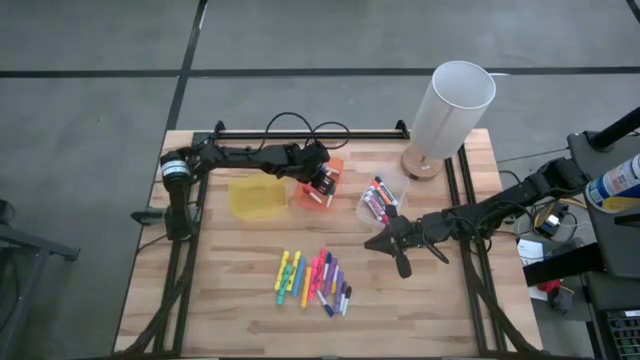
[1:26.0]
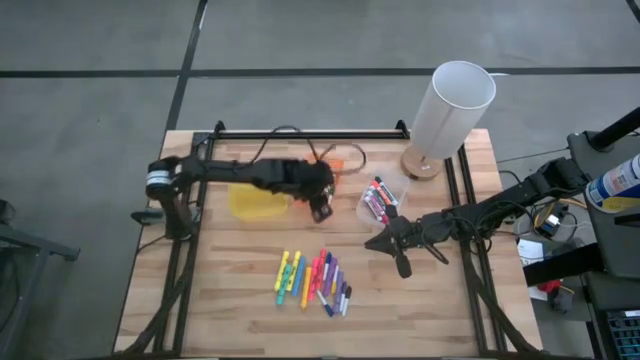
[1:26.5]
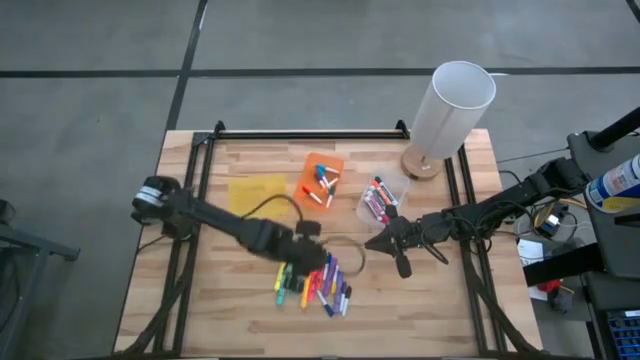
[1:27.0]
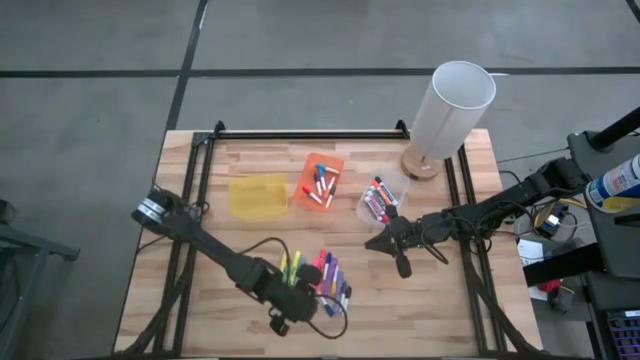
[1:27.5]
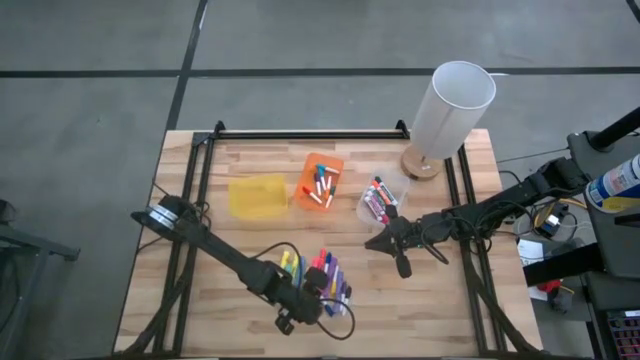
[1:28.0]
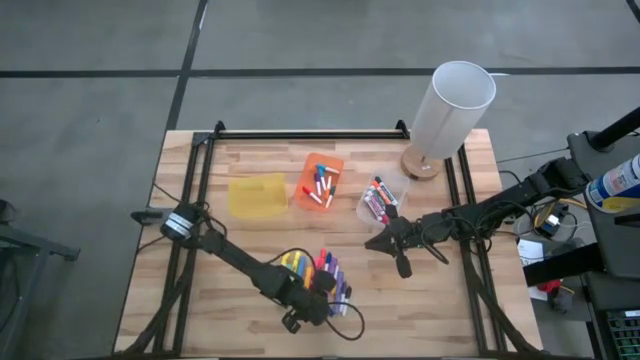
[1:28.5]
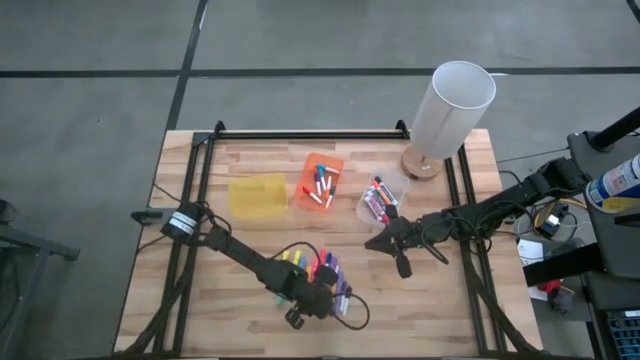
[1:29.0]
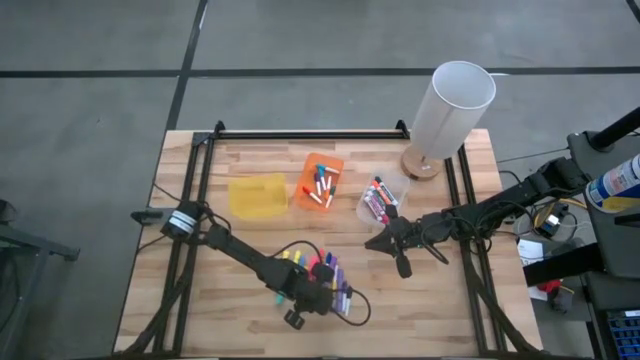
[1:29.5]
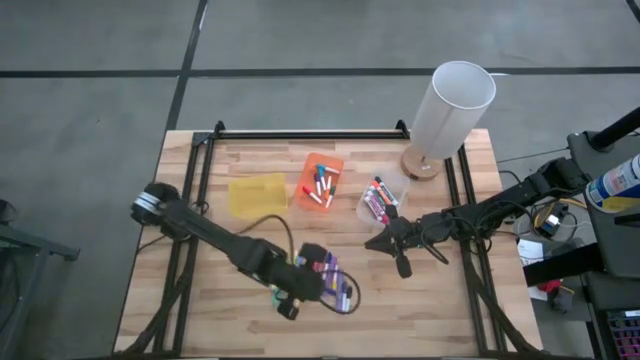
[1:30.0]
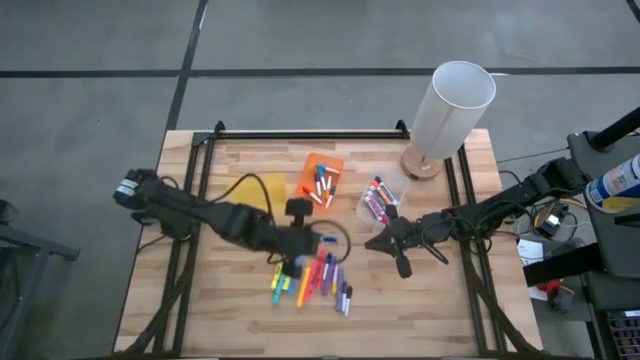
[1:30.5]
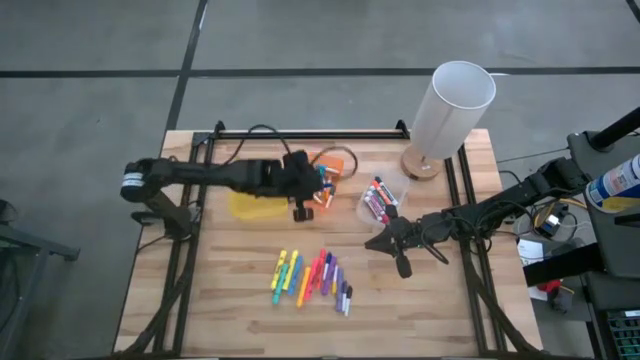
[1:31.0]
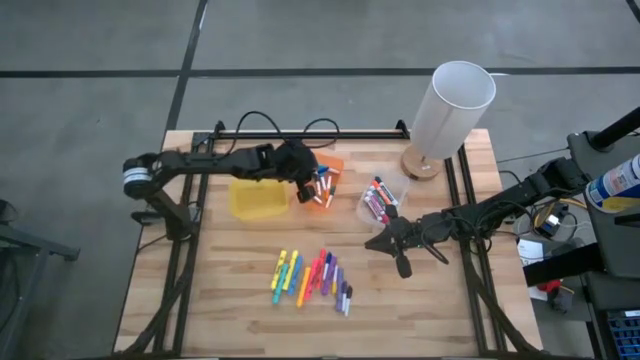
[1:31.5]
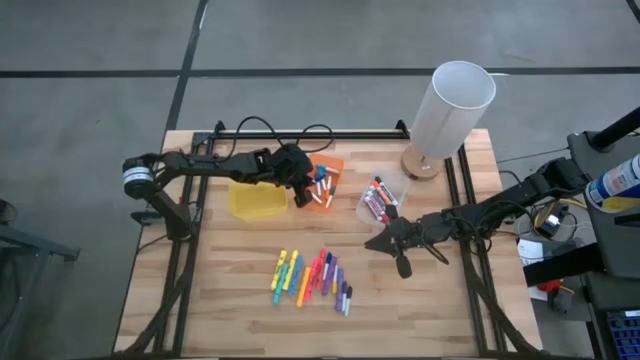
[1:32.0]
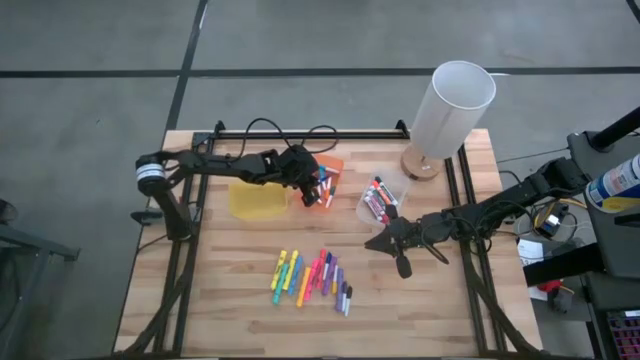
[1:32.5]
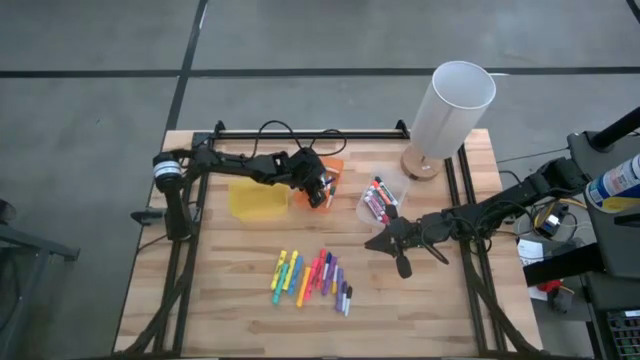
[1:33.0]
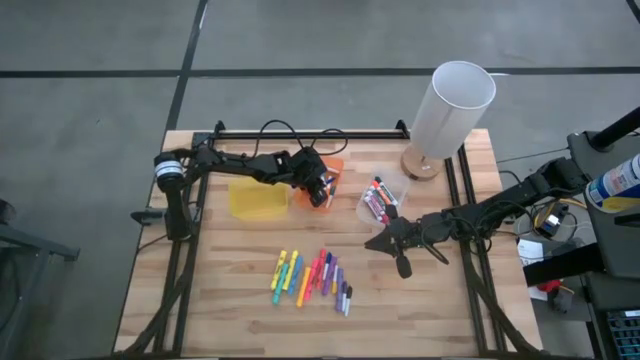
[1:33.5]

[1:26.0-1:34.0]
Task: Pick & Place Markers
Put the bottom blue pen into the orange bin

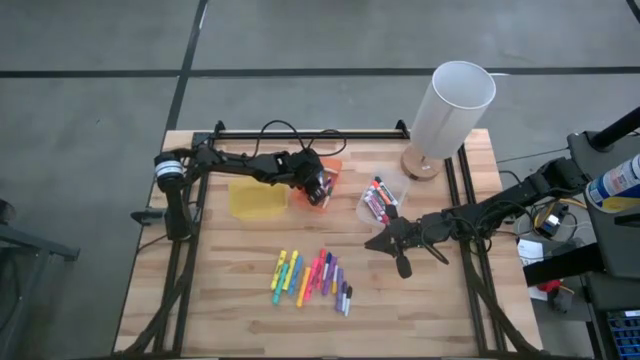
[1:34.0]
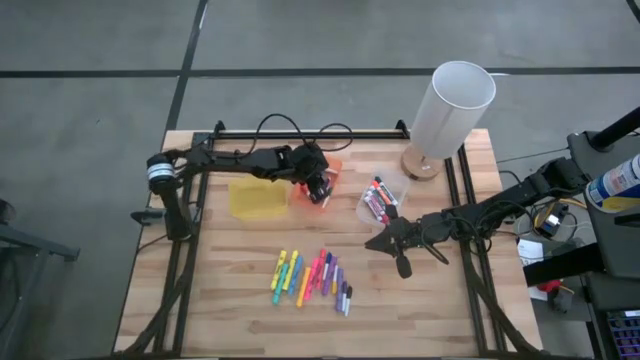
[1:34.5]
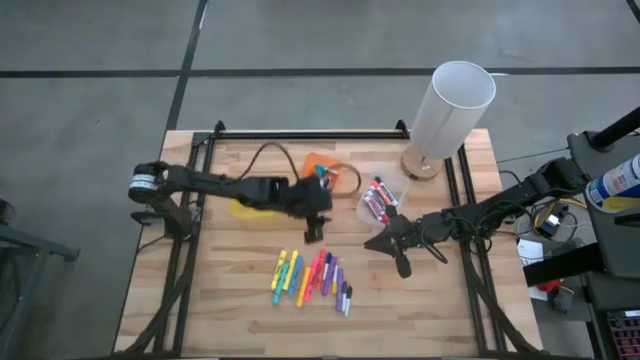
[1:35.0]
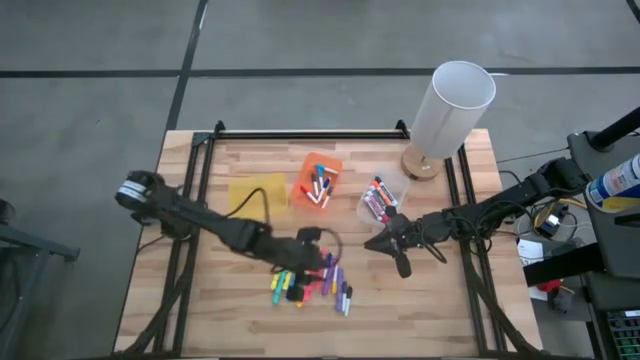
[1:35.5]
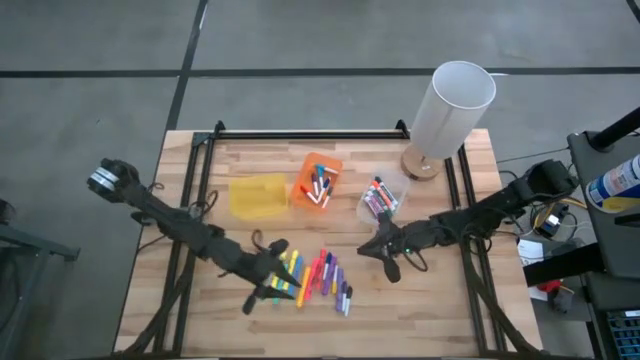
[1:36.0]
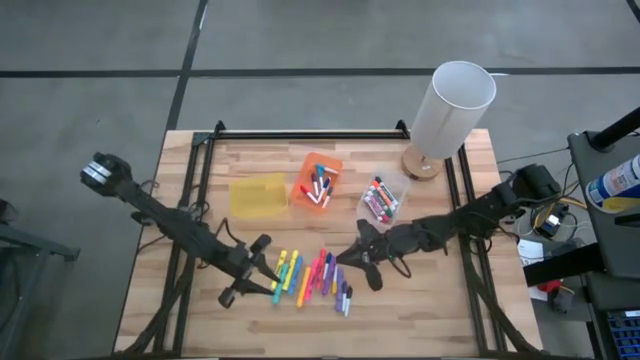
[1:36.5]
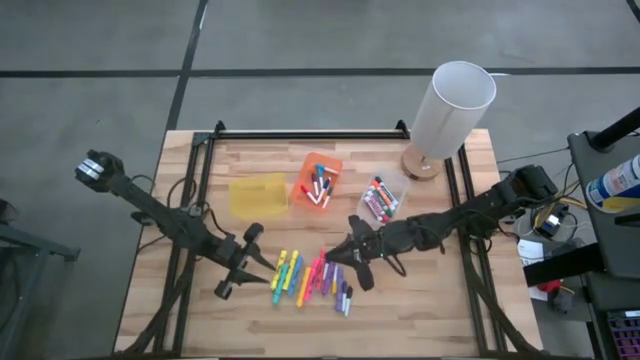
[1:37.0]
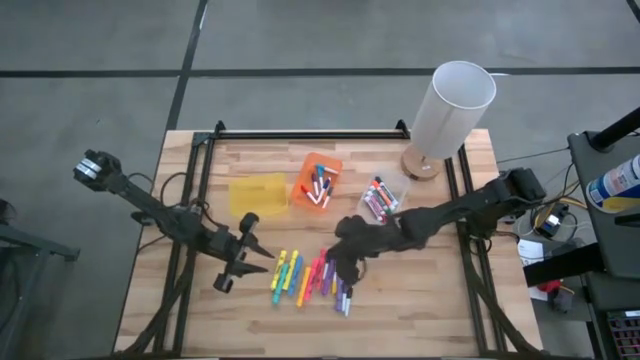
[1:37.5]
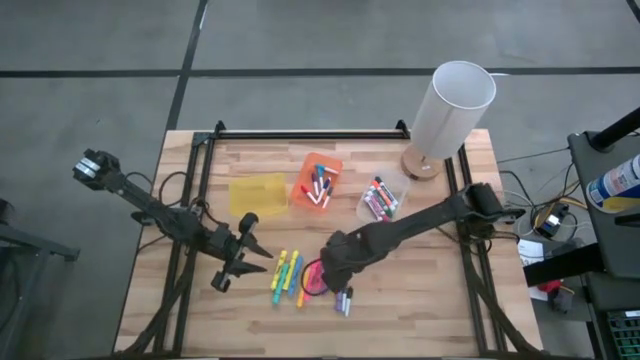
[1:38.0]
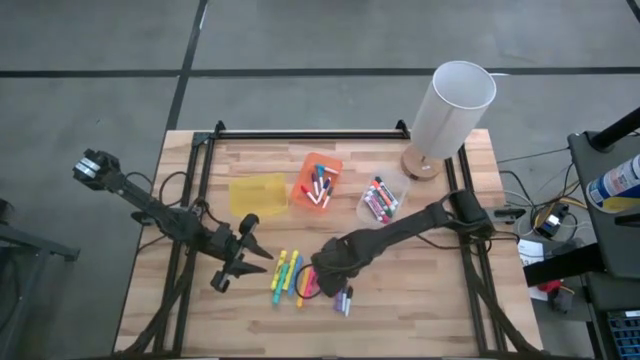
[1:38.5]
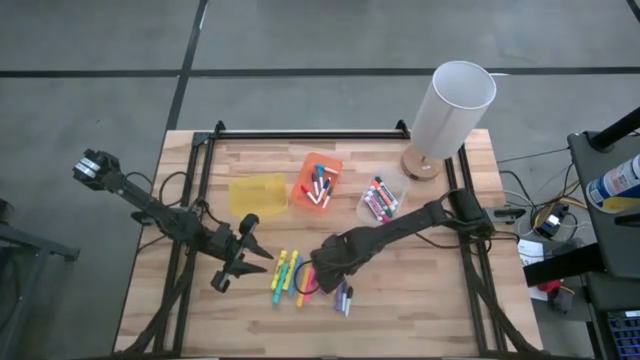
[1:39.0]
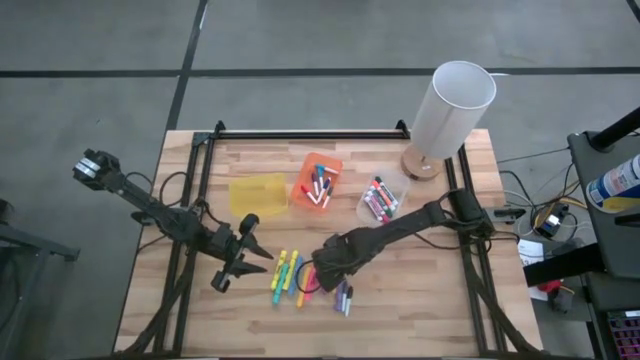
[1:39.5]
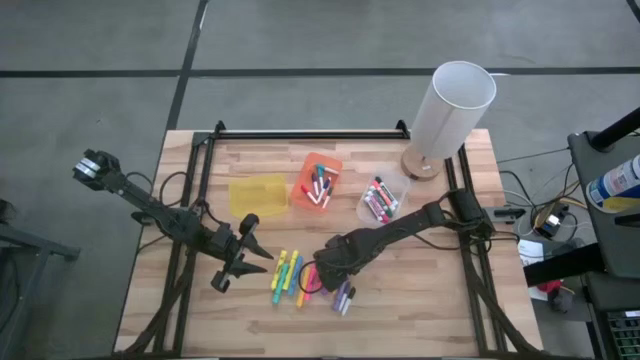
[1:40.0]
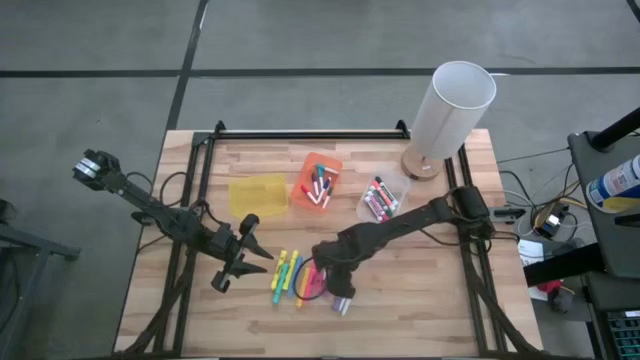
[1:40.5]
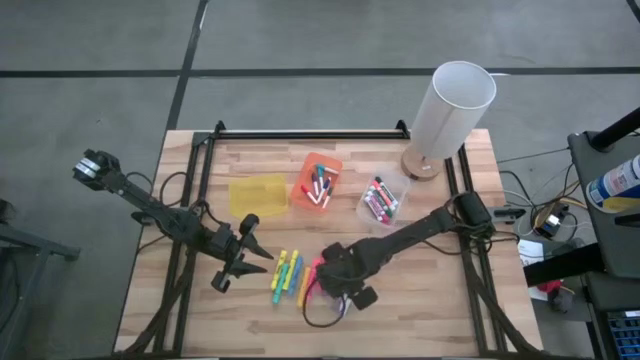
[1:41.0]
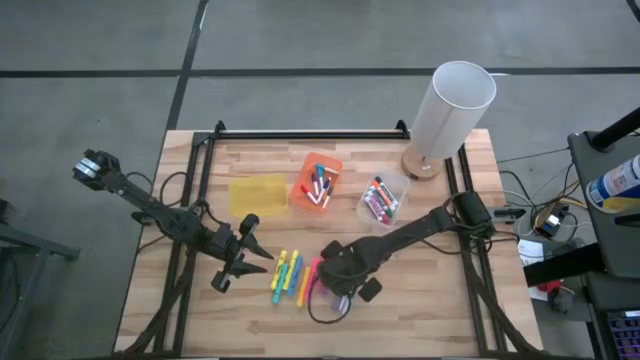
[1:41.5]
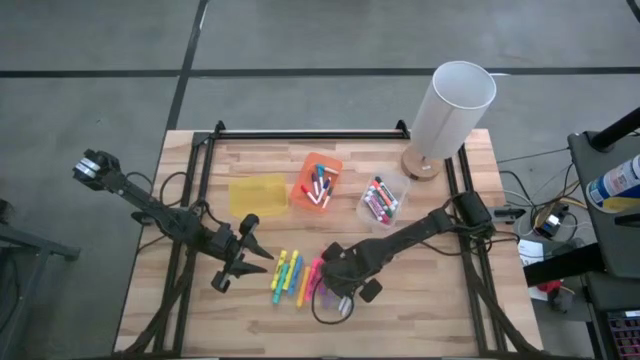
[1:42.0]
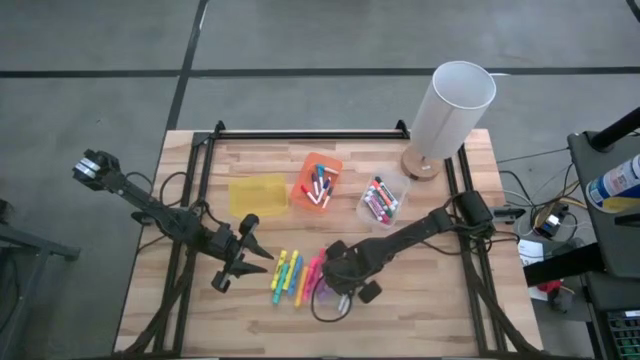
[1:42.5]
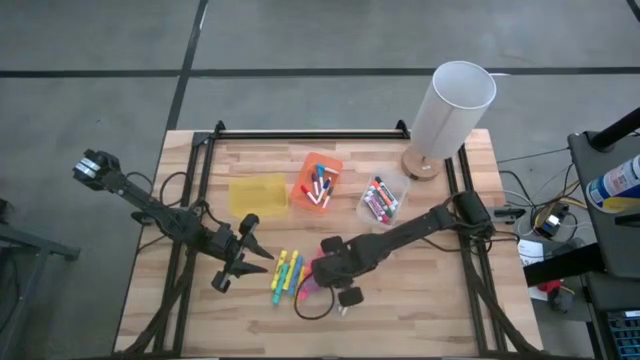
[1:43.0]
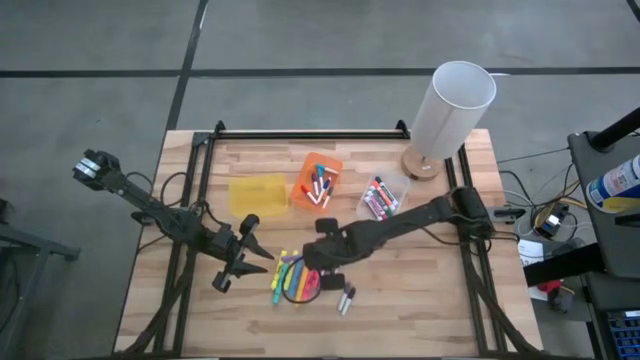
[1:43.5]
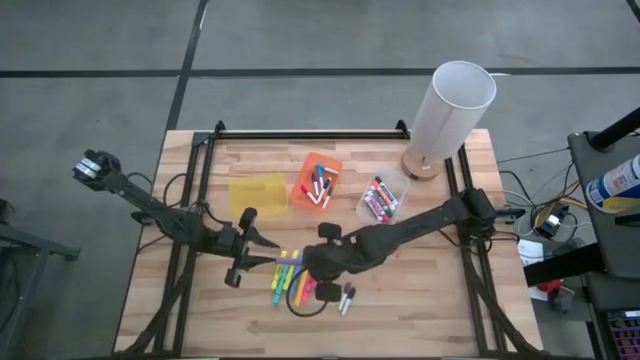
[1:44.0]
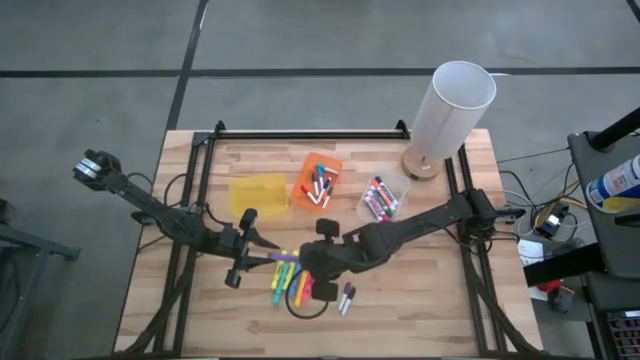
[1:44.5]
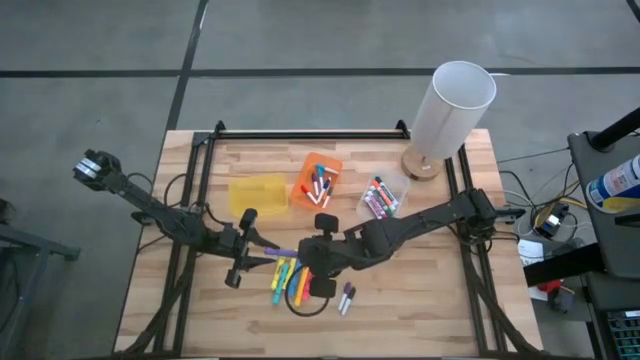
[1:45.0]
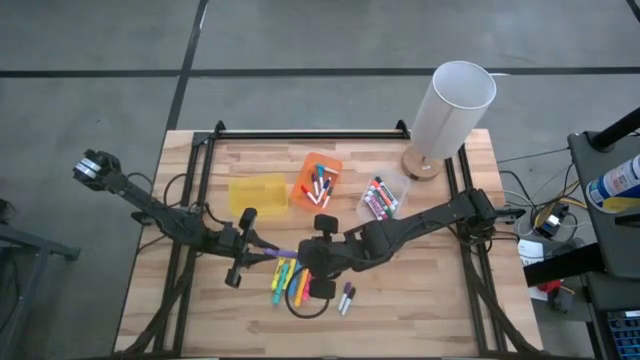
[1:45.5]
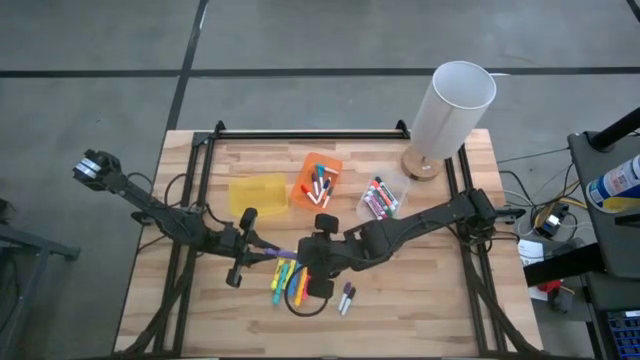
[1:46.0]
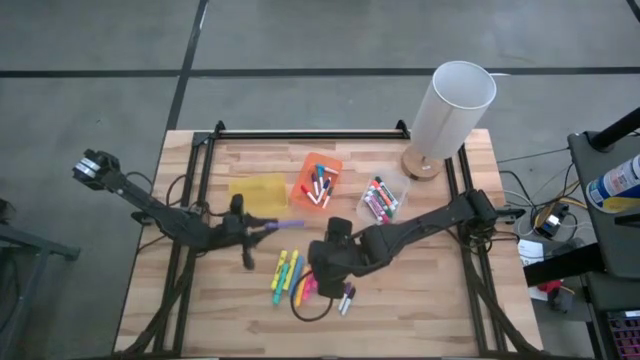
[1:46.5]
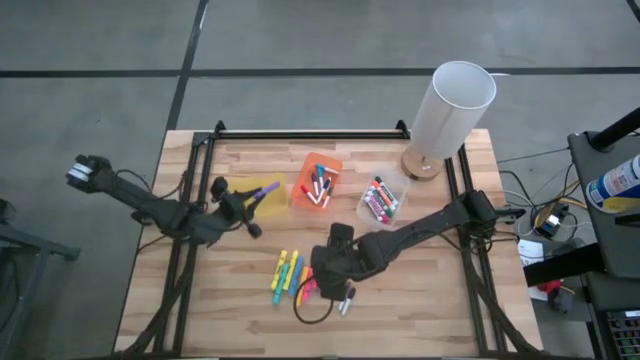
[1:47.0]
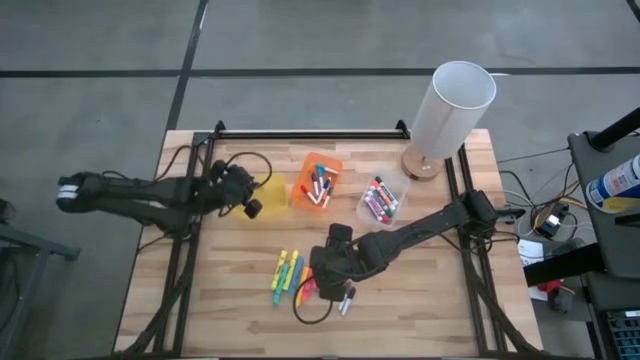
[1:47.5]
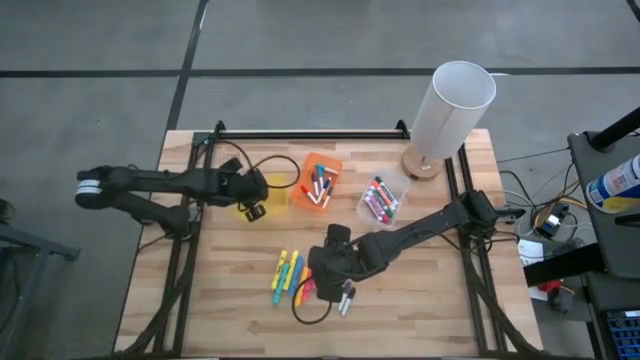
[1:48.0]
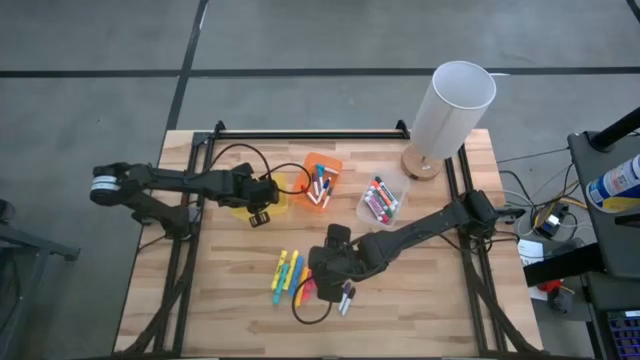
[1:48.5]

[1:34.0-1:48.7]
Put the right violet highlighter pen into the yellow bin
